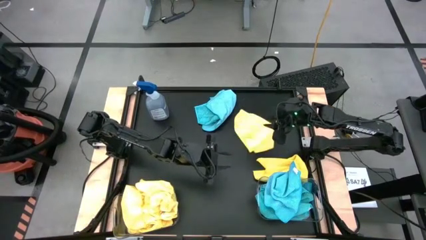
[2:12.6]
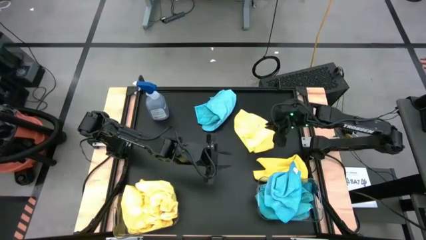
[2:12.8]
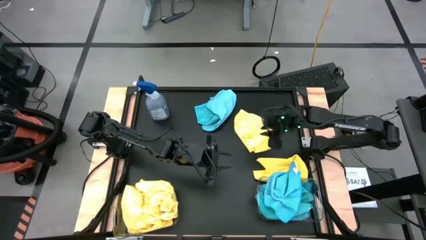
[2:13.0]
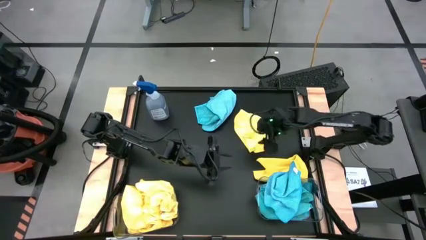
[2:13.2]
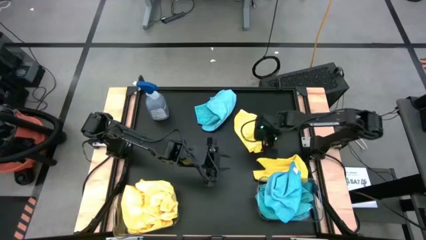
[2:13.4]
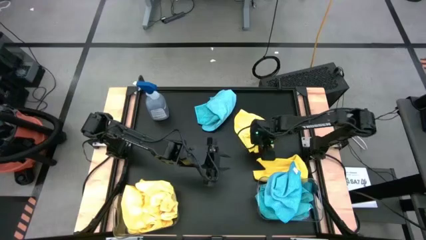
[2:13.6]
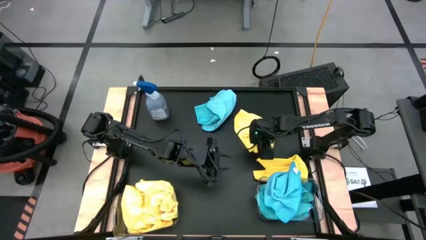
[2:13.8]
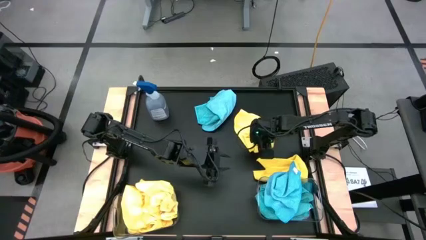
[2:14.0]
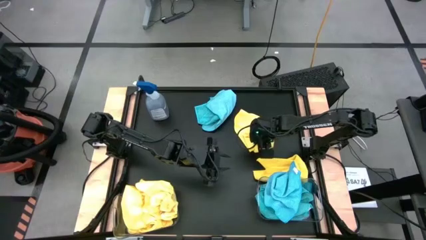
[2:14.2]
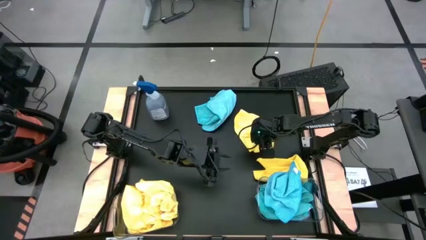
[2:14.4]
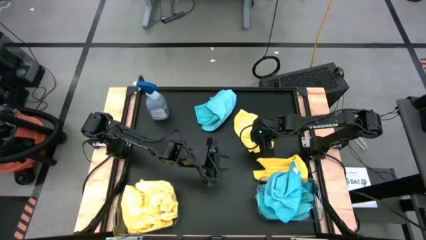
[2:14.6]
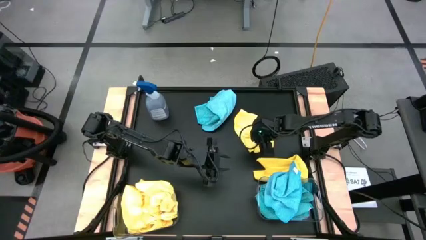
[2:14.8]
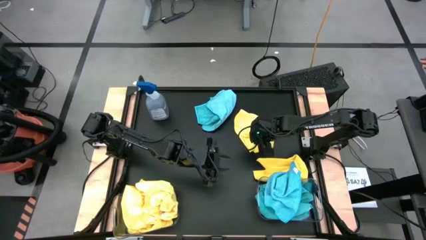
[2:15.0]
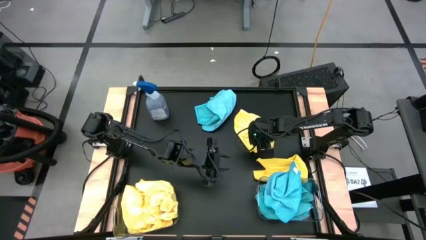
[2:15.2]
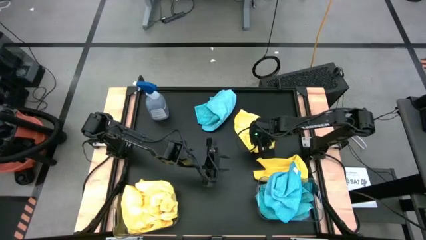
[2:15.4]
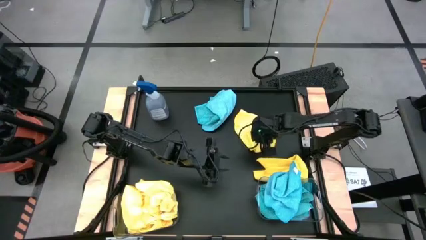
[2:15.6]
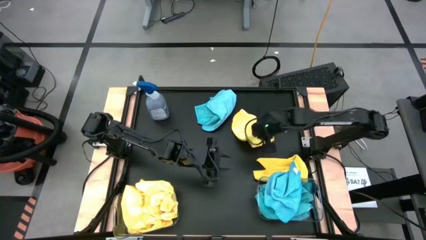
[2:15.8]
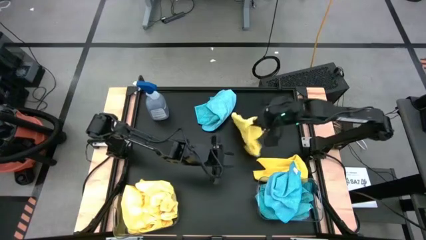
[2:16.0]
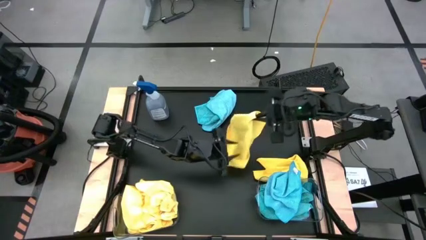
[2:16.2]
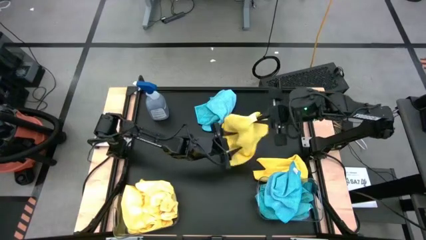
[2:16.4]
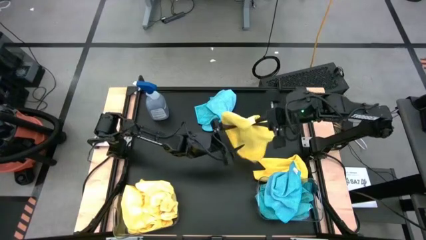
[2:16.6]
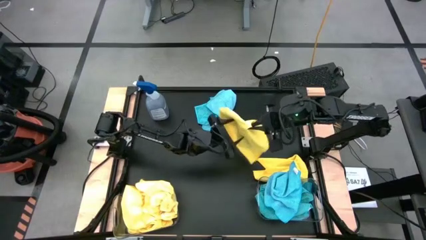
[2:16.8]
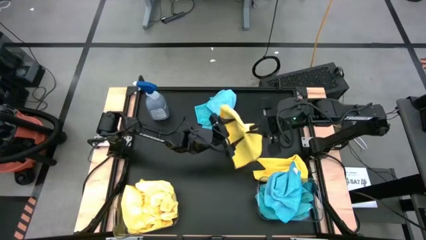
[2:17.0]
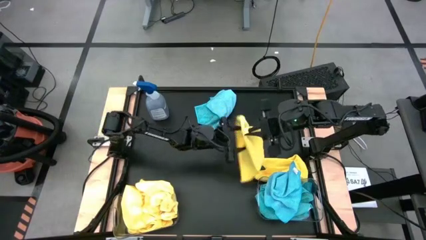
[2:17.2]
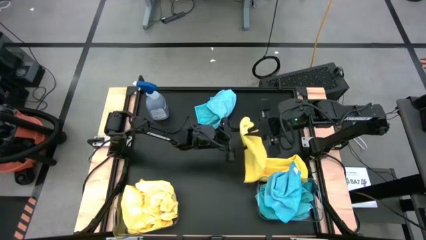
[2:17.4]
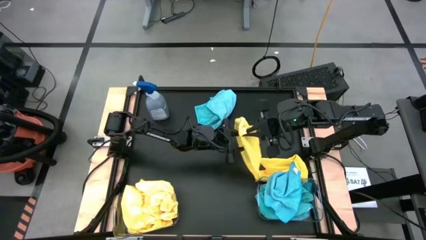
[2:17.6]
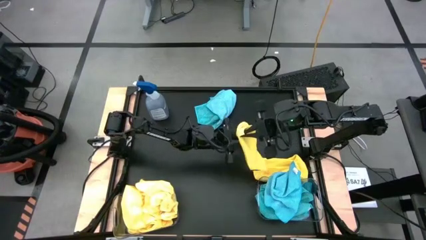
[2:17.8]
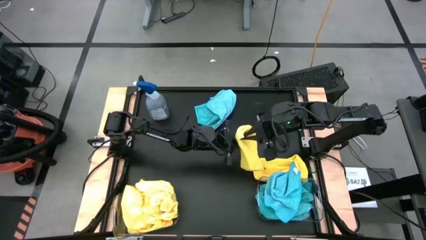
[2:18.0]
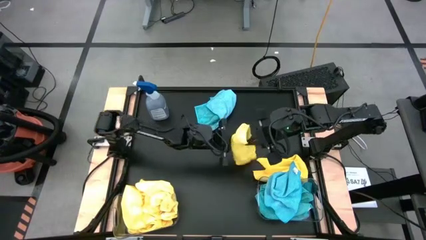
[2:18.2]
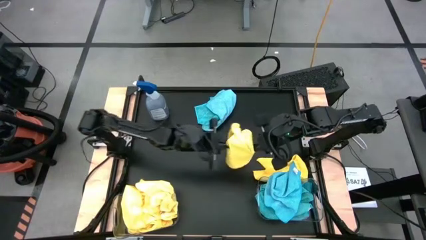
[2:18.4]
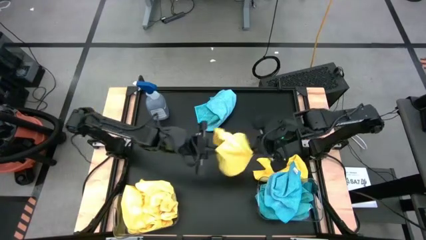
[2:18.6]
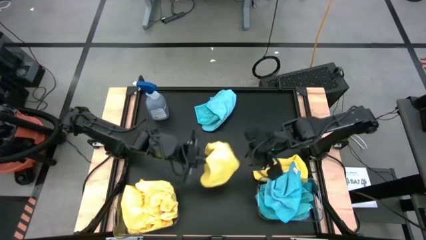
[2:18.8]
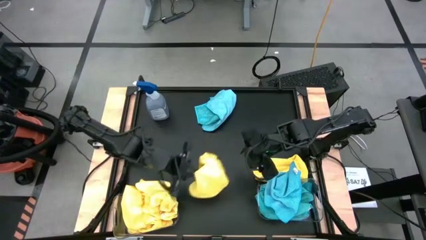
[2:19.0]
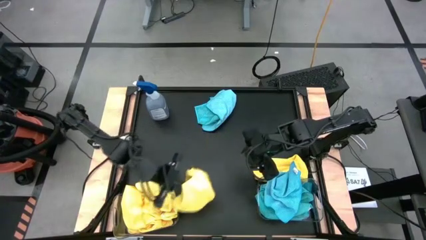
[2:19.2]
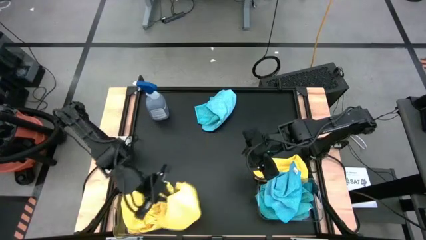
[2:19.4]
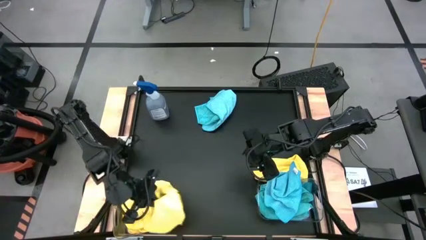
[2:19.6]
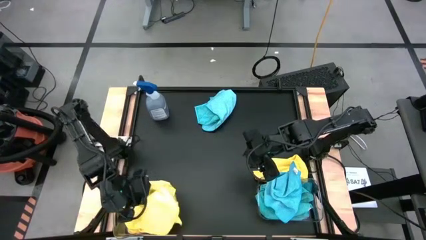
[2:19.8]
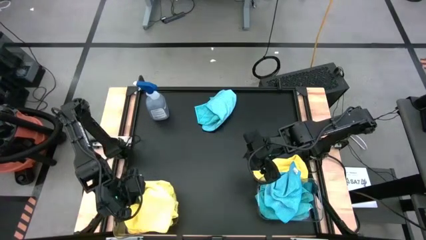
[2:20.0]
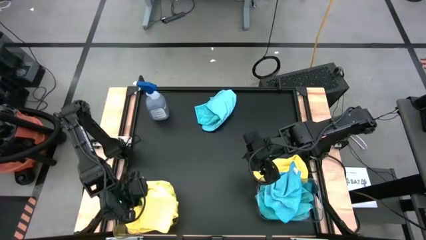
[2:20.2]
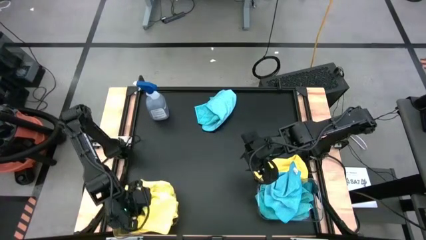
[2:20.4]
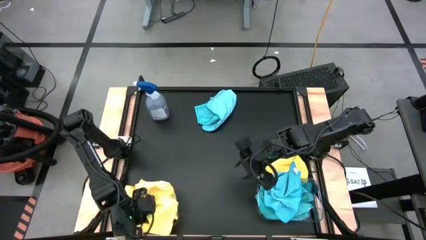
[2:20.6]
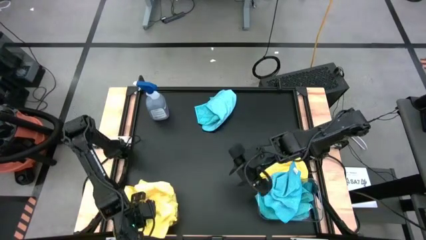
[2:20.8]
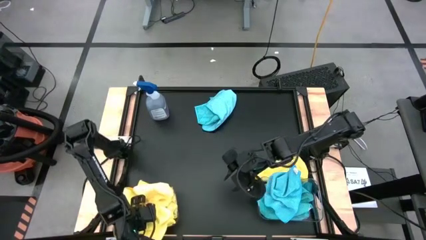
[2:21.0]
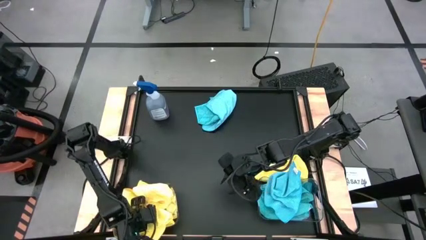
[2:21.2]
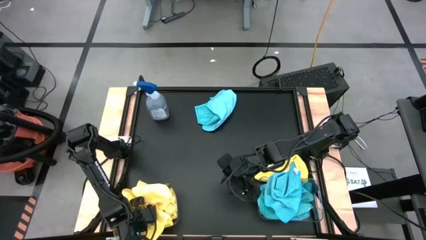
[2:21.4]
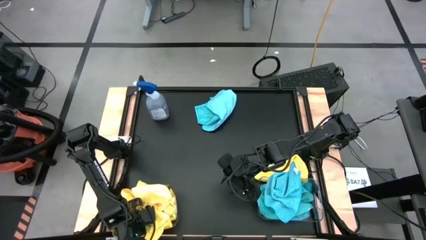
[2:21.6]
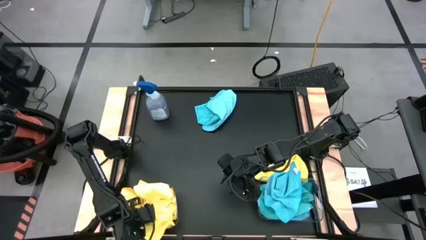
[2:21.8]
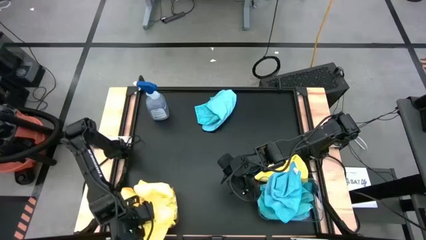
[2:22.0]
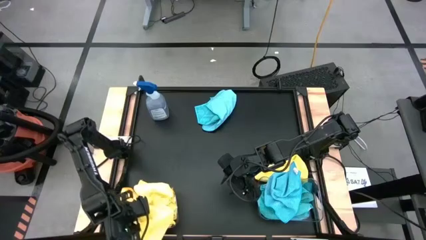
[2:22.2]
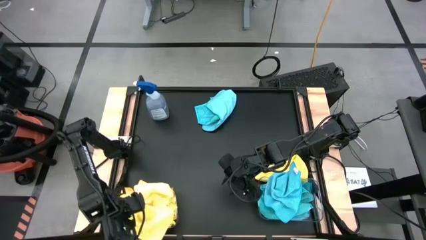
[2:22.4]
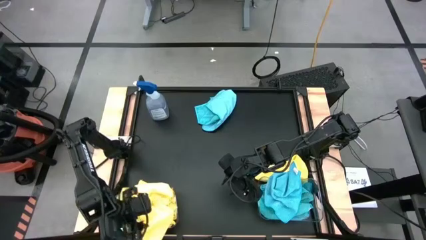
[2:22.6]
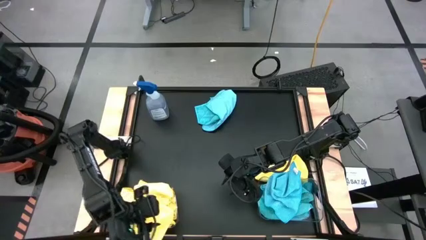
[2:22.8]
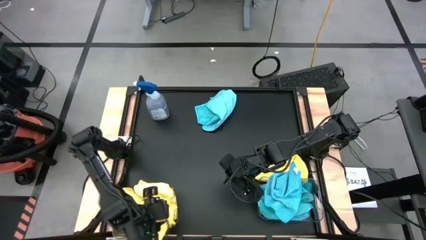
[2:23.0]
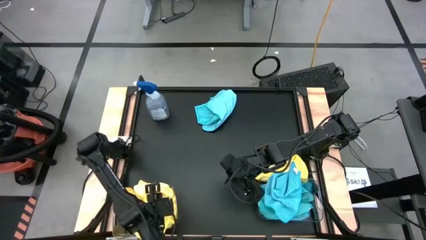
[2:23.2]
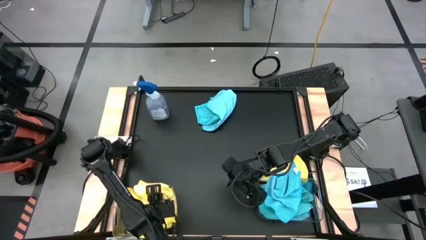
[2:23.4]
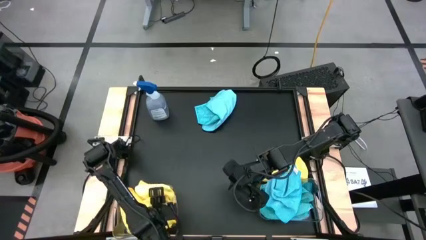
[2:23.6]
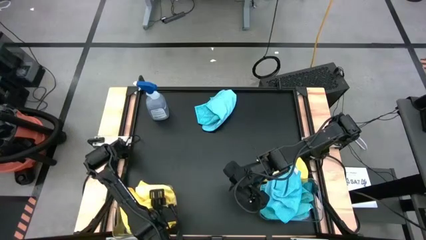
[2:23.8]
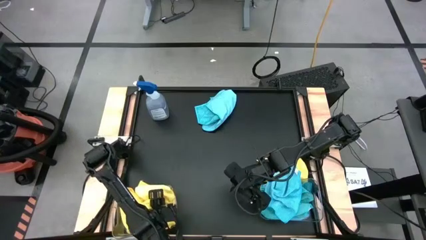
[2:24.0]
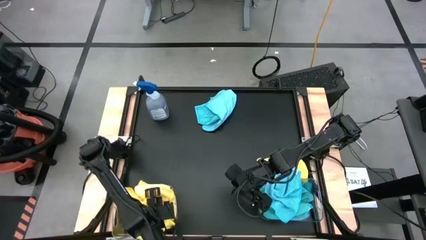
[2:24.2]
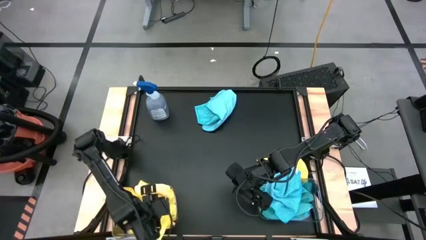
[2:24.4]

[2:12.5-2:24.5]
Task: Sort microfiber towel by color & place in baskets
Put the yellow towel into the left transparent bin
